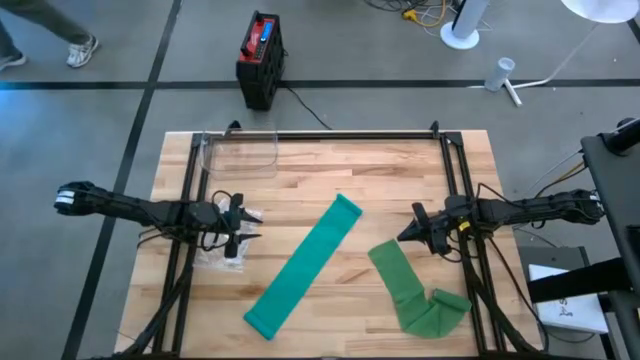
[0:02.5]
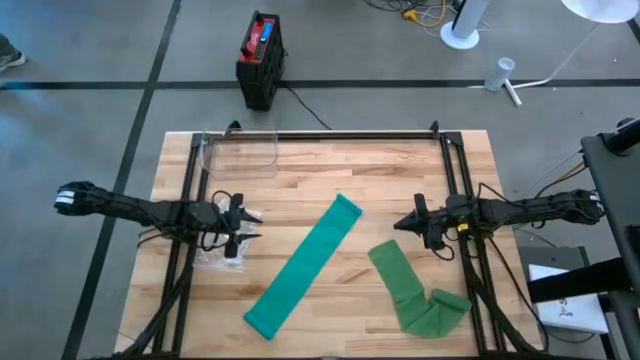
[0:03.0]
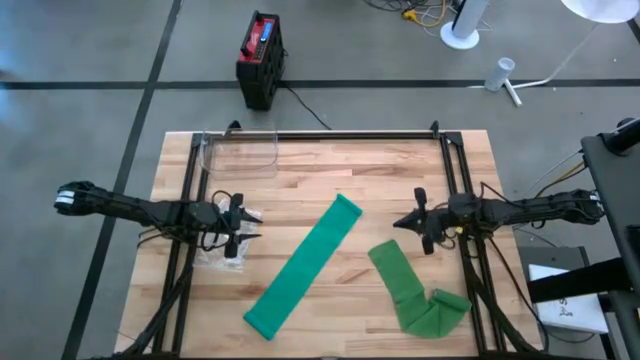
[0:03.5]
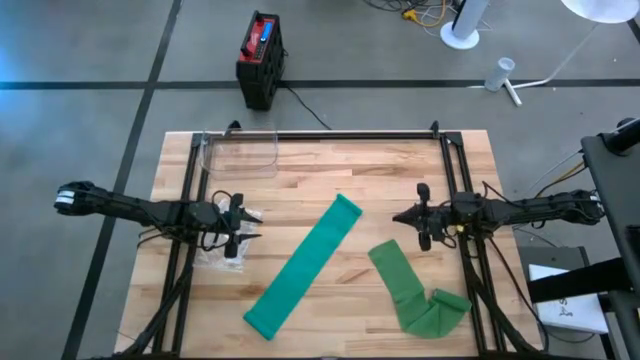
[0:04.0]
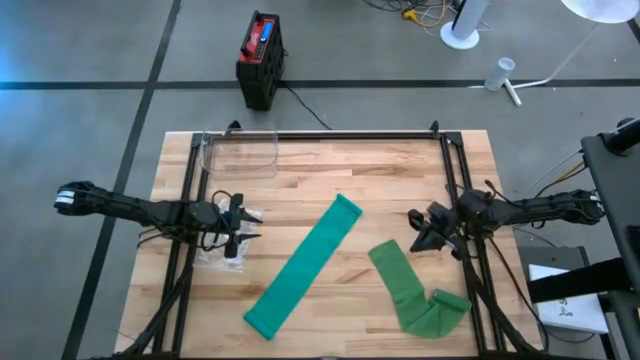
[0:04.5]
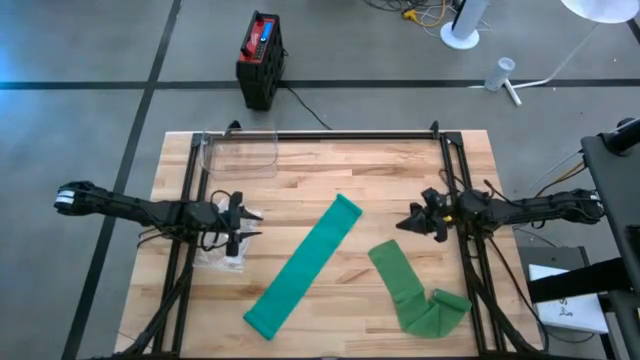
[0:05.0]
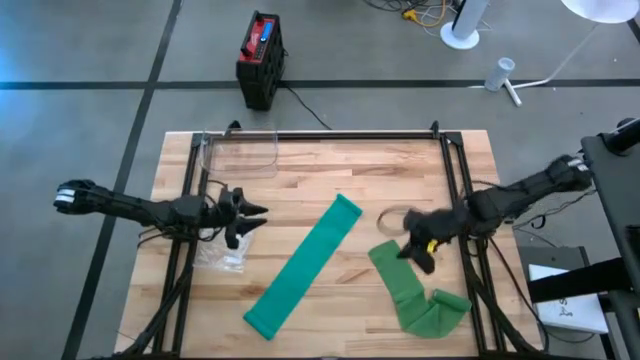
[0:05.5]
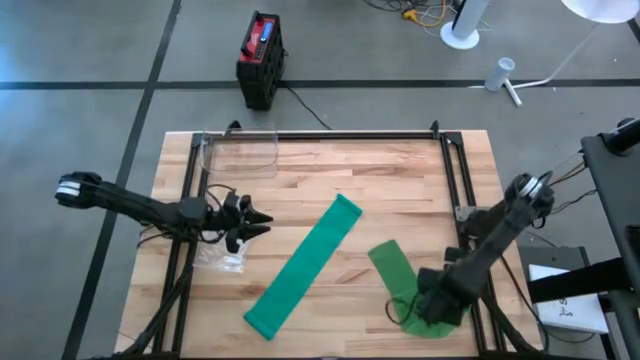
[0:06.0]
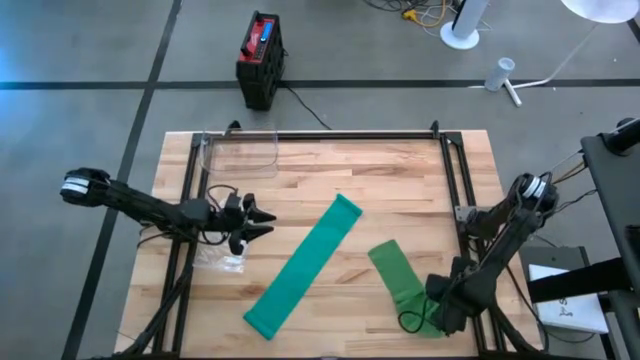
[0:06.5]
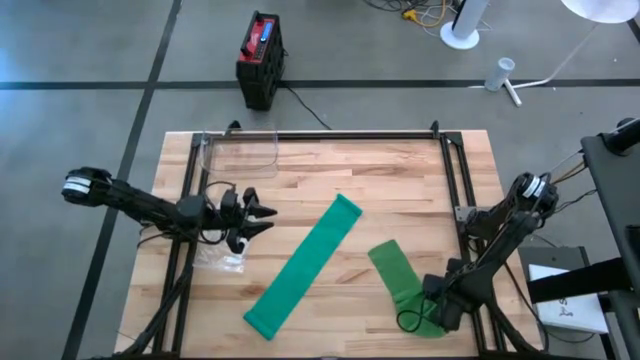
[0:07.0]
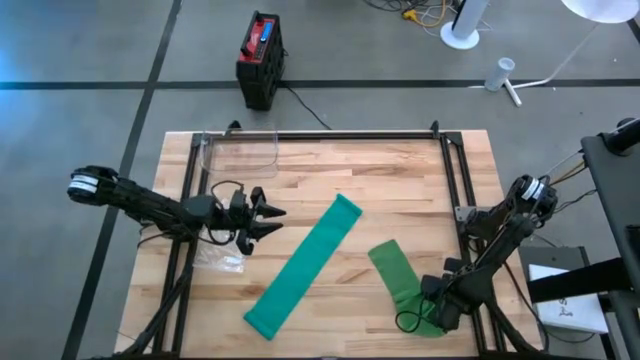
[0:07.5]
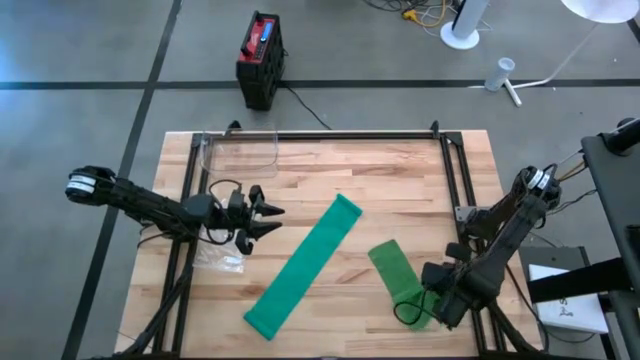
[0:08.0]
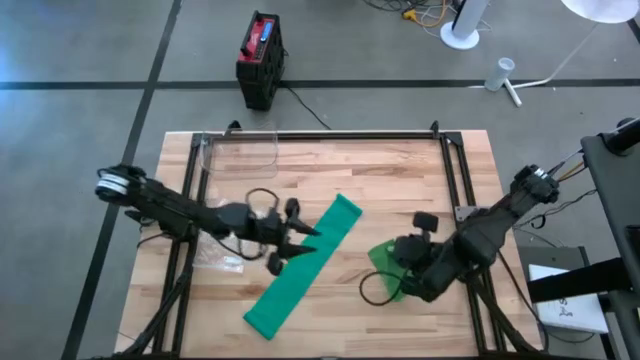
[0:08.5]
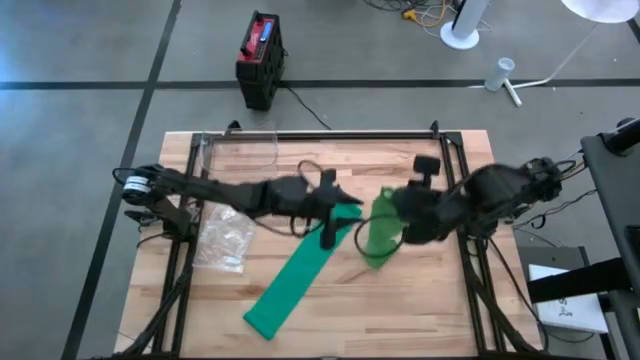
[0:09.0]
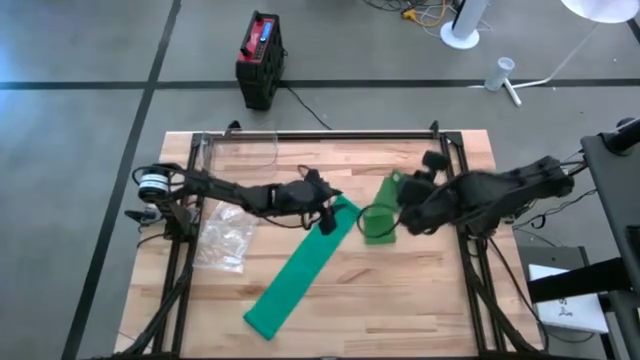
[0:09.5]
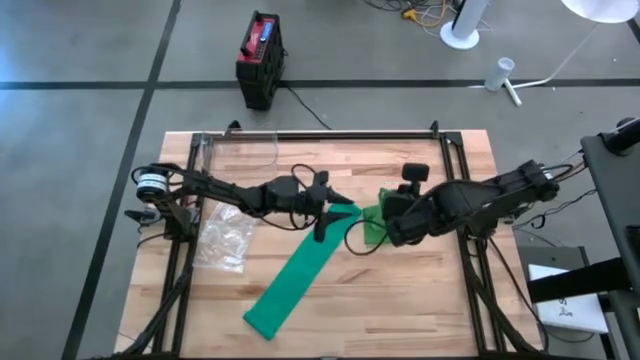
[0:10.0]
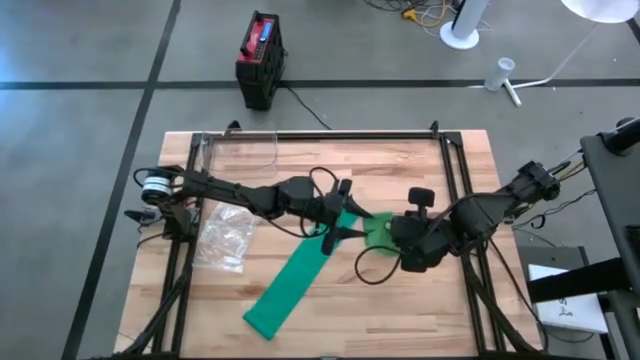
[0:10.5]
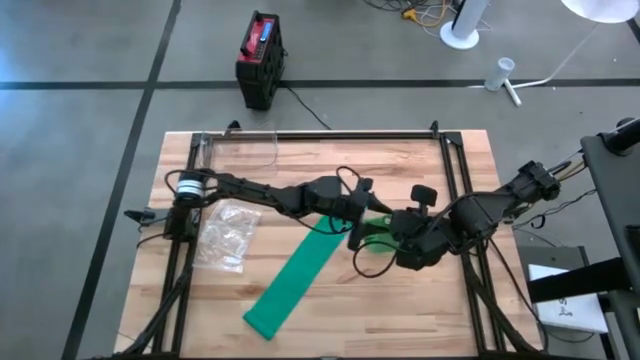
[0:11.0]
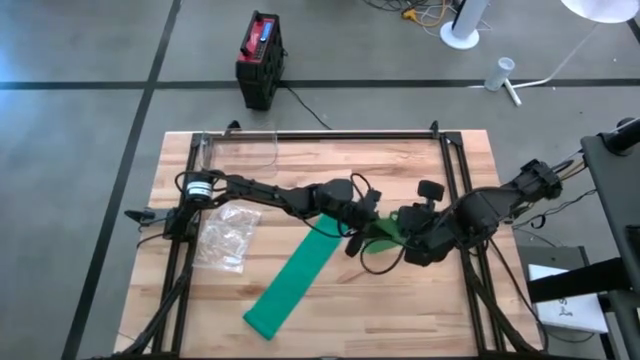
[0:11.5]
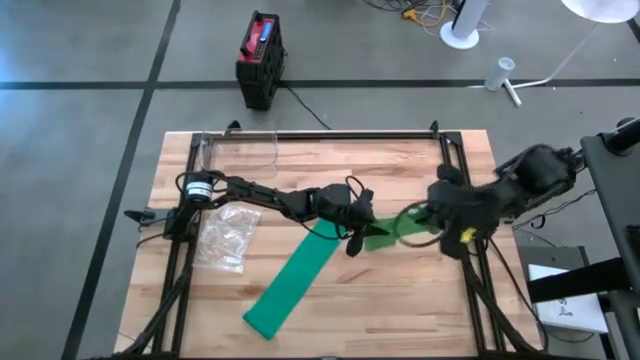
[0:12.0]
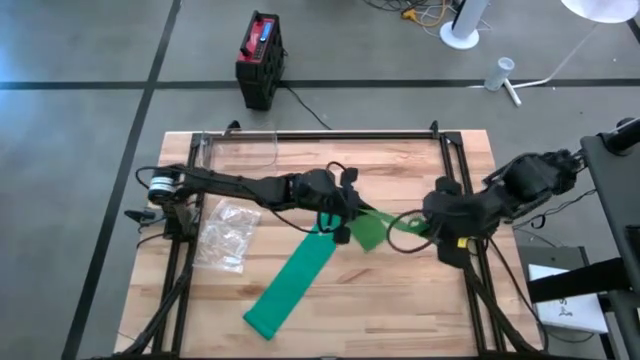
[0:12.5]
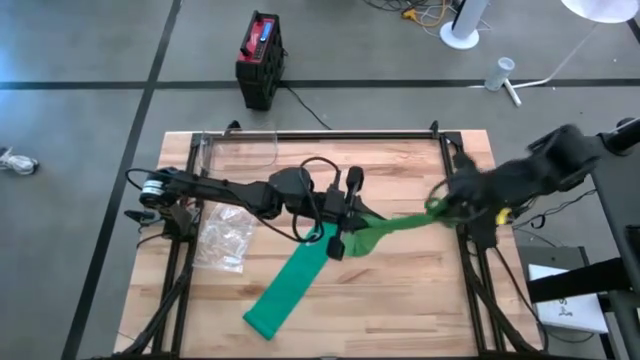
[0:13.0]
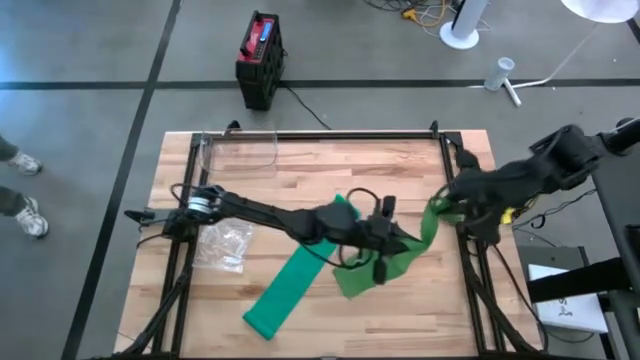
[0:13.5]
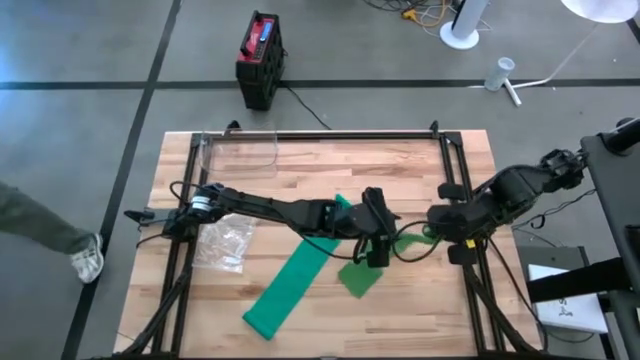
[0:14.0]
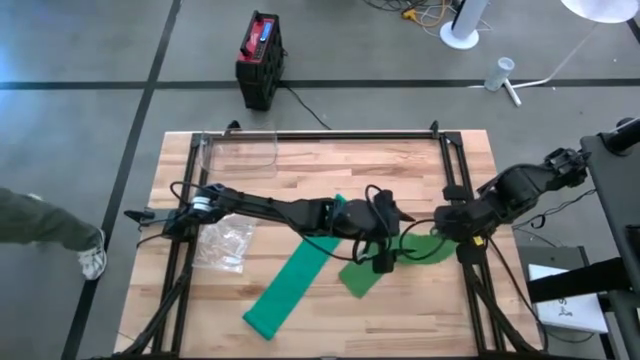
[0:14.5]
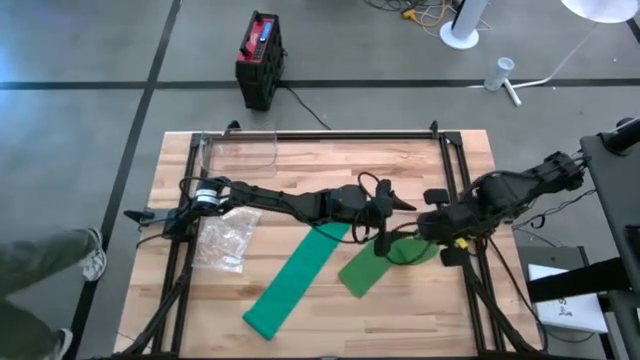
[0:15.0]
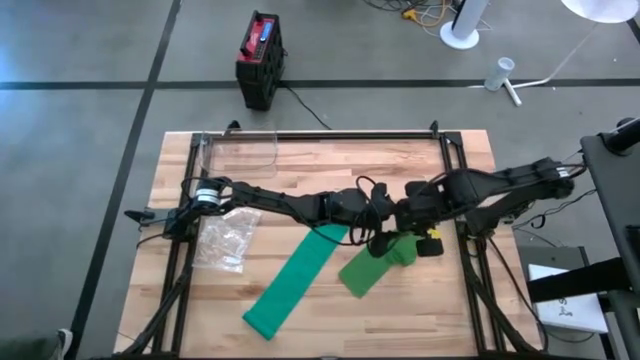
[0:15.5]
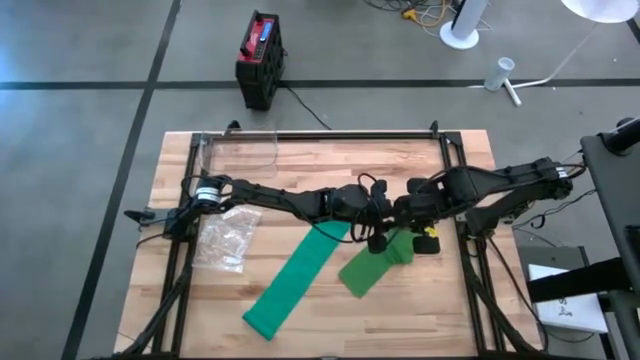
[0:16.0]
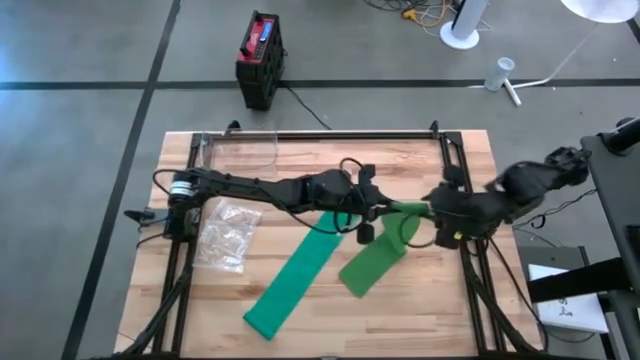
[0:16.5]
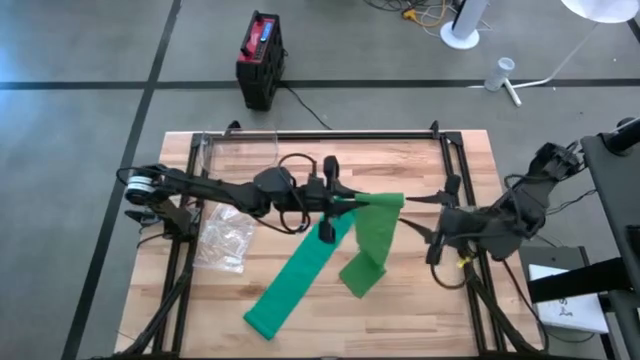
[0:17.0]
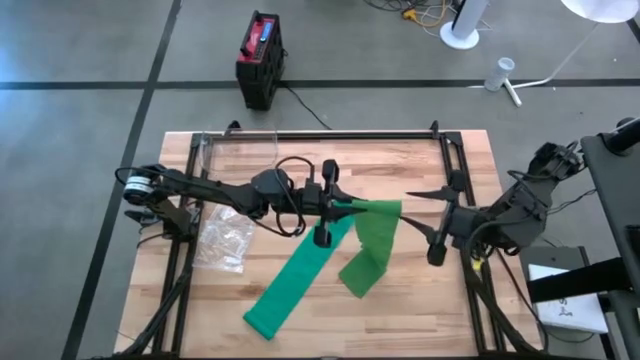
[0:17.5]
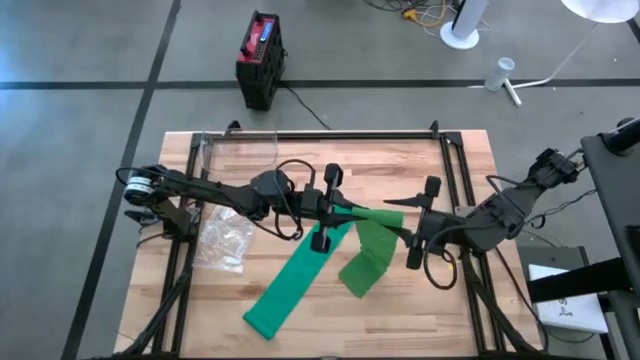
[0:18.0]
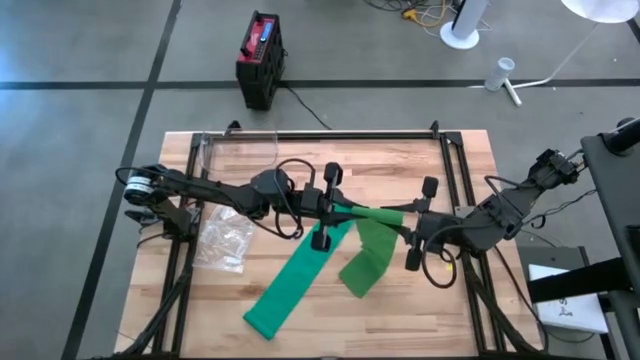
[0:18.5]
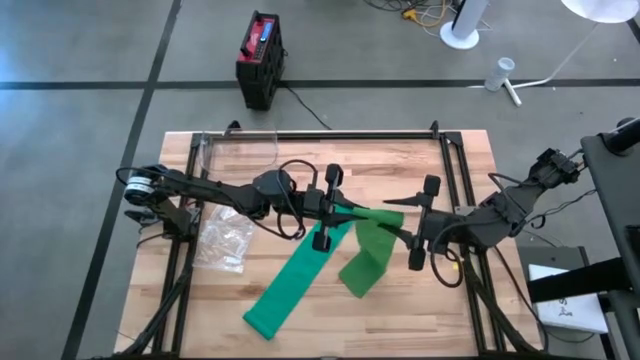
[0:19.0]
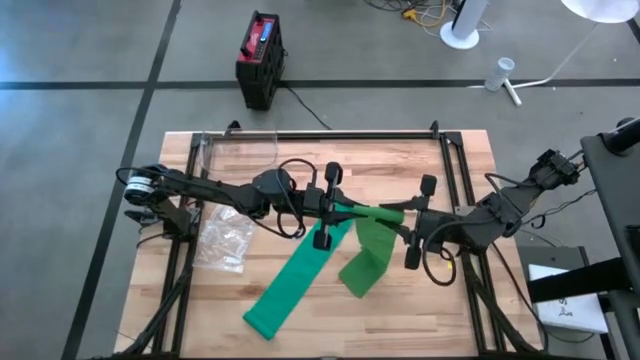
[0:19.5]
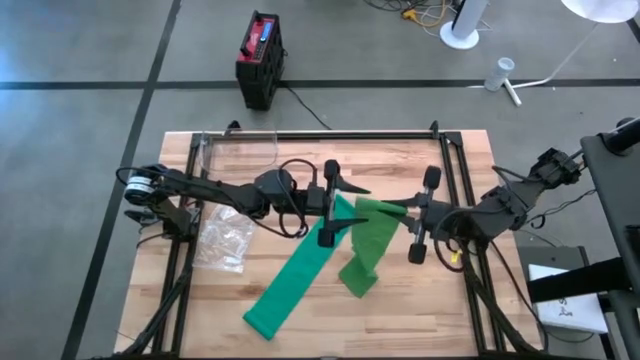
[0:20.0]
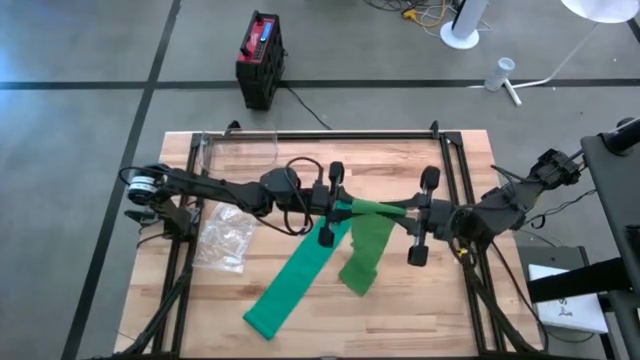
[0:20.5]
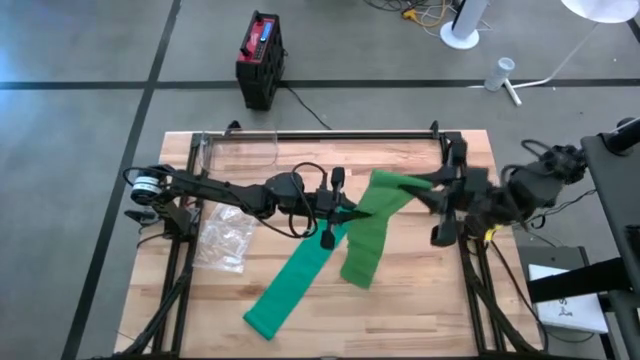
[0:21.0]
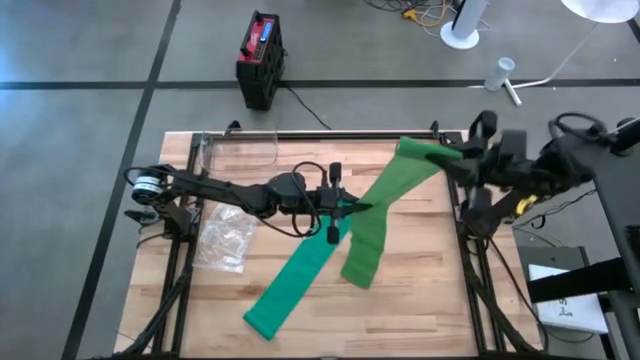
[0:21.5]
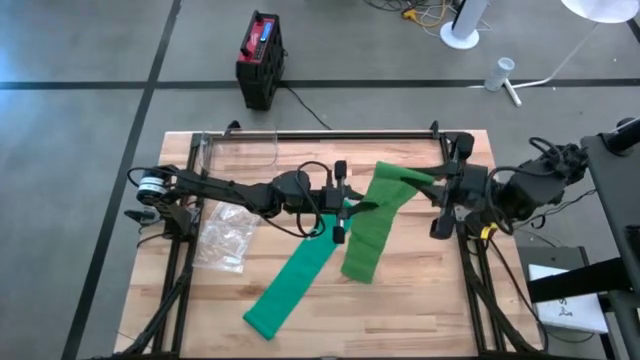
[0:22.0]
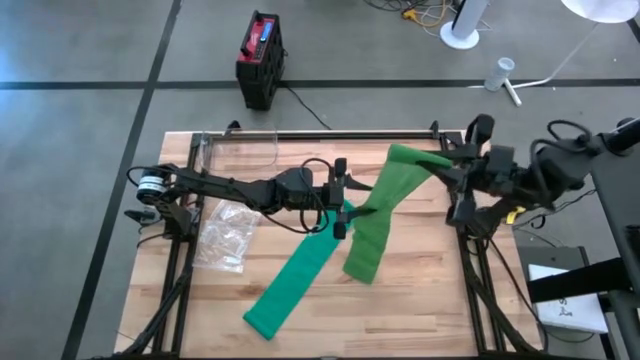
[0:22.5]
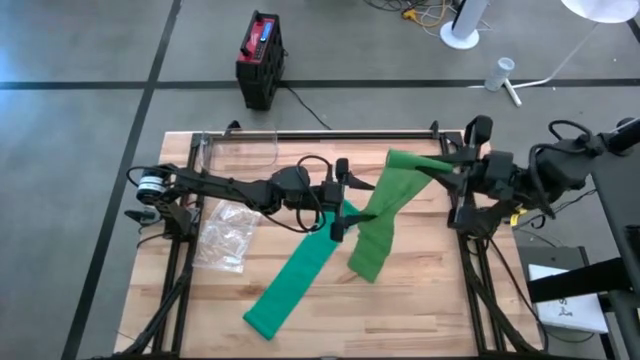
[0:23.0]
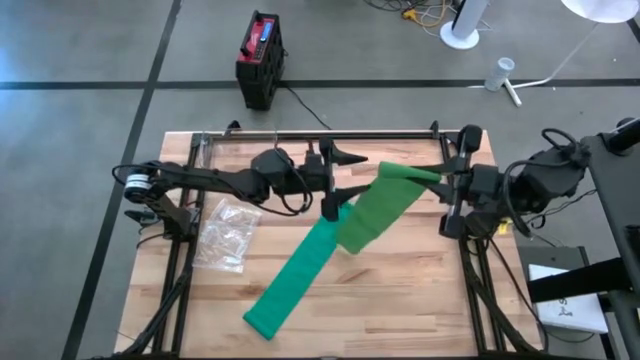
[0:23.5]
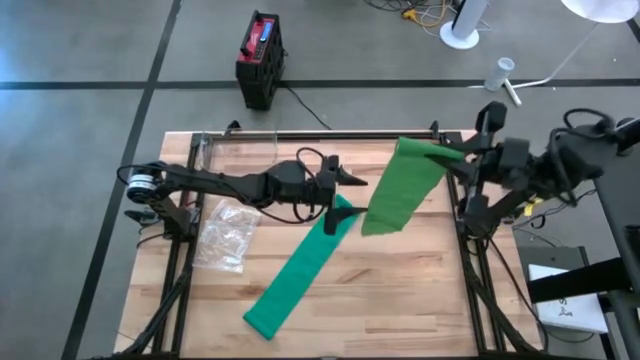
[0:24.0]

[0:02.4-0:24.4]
Task: Roll bandage
Roll the green bandage
